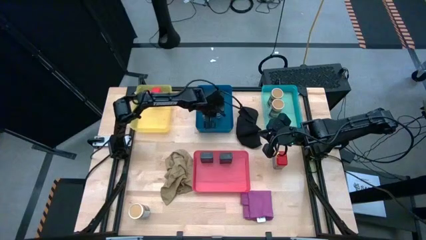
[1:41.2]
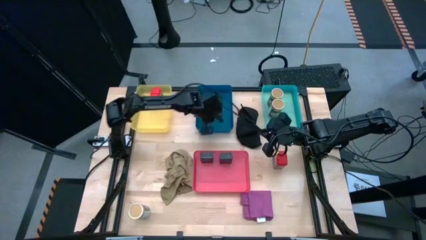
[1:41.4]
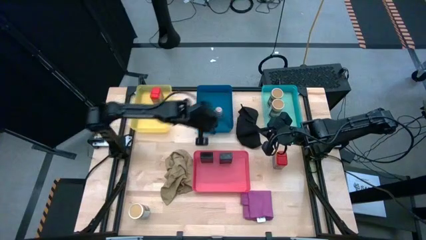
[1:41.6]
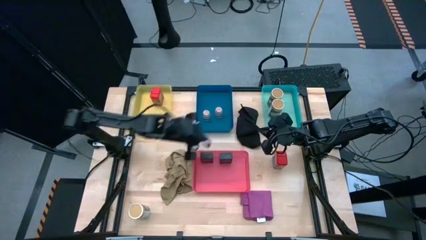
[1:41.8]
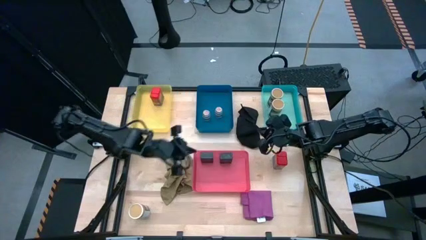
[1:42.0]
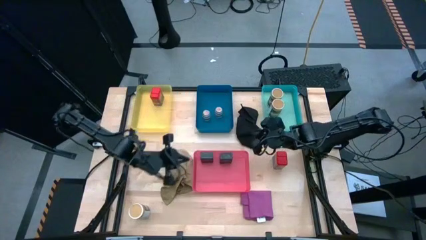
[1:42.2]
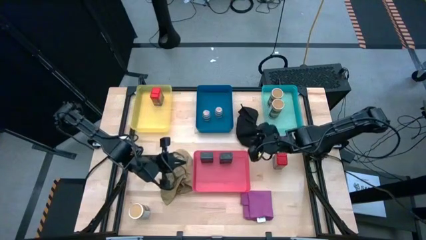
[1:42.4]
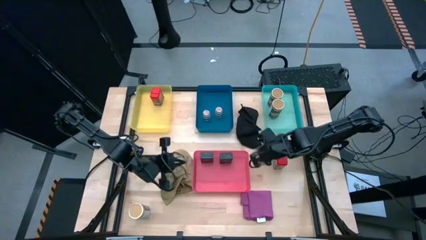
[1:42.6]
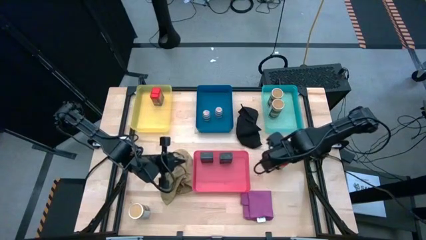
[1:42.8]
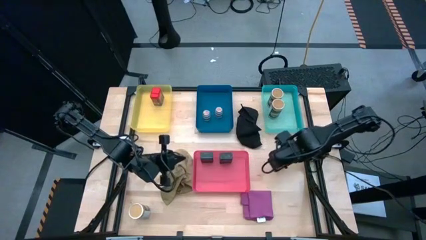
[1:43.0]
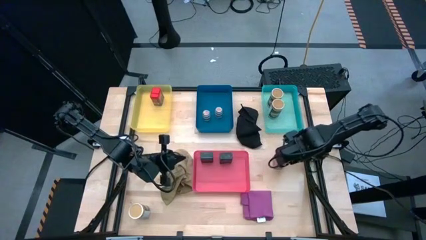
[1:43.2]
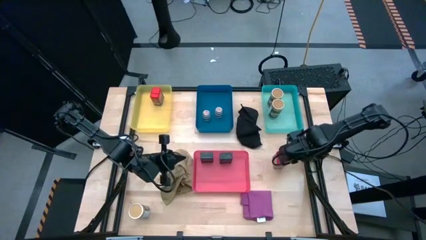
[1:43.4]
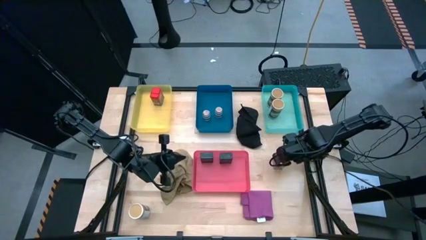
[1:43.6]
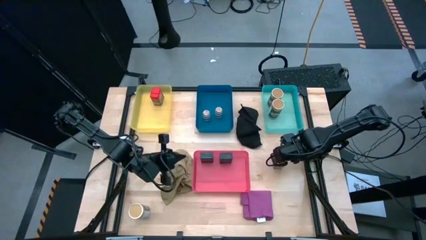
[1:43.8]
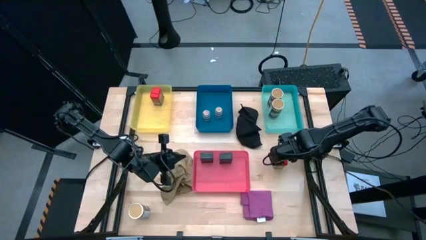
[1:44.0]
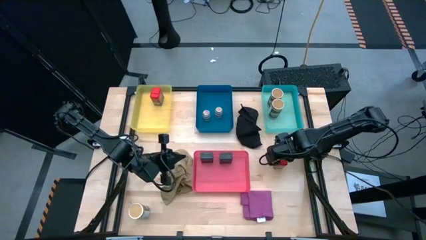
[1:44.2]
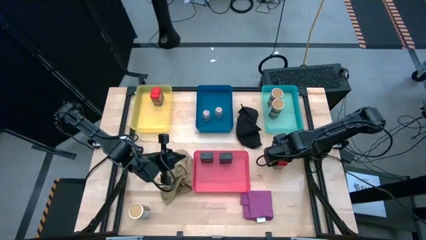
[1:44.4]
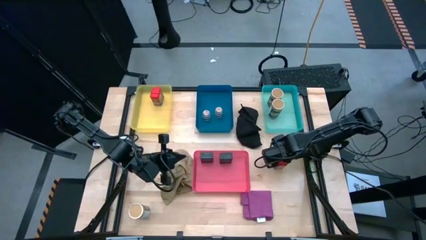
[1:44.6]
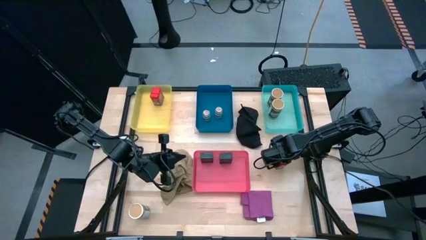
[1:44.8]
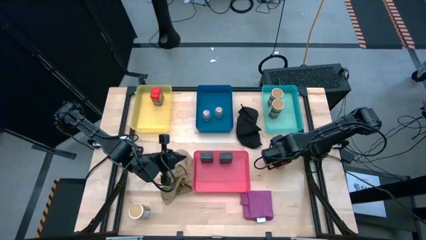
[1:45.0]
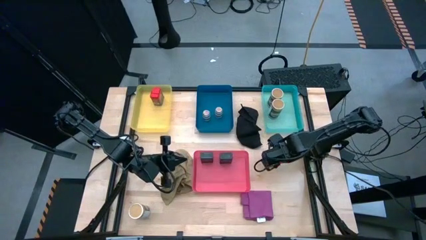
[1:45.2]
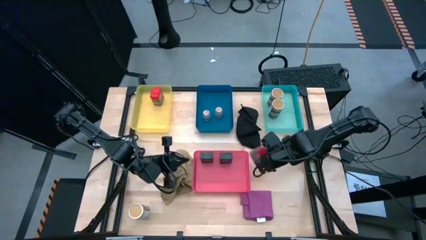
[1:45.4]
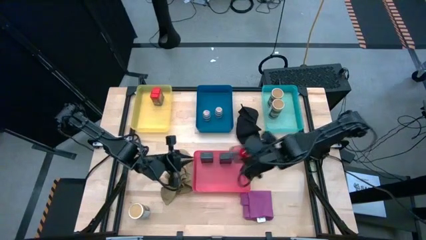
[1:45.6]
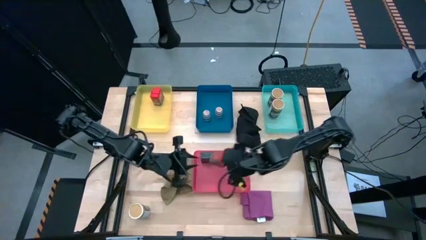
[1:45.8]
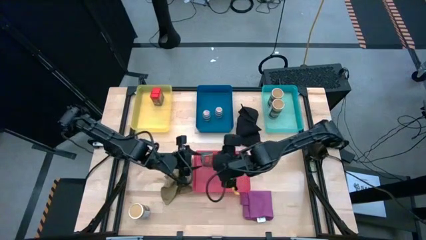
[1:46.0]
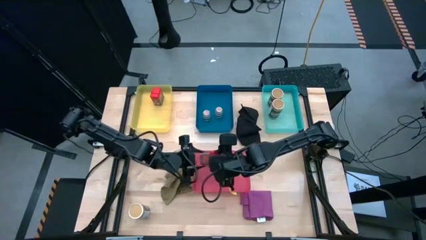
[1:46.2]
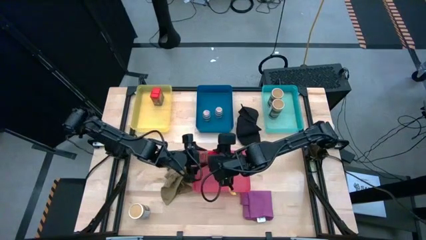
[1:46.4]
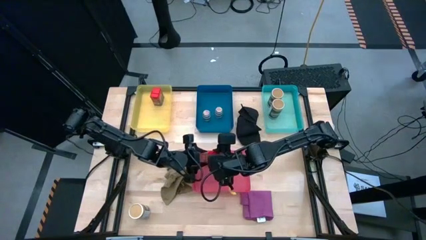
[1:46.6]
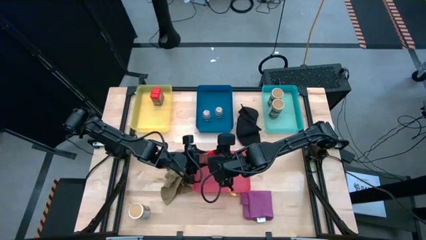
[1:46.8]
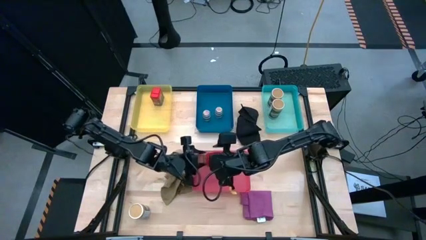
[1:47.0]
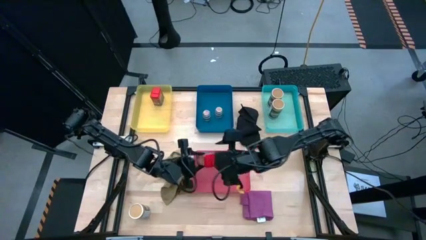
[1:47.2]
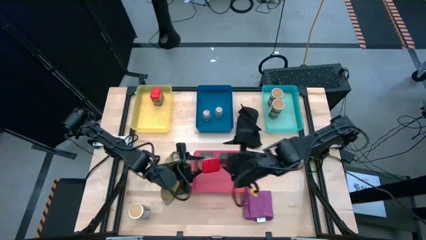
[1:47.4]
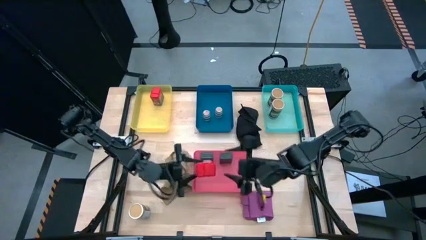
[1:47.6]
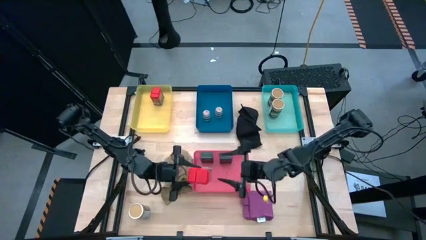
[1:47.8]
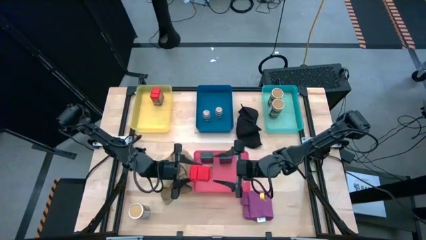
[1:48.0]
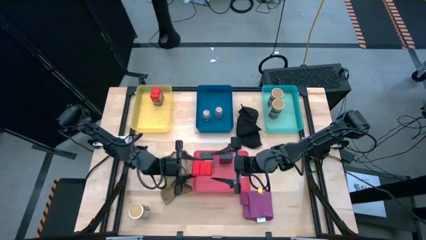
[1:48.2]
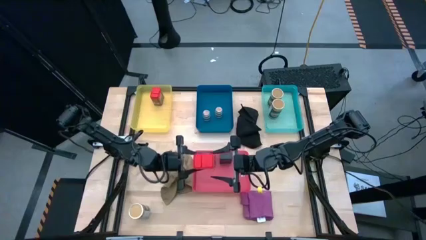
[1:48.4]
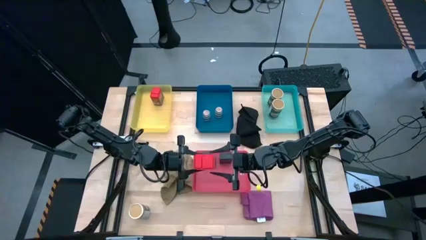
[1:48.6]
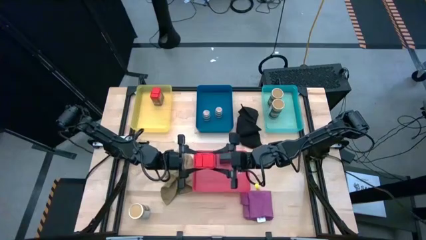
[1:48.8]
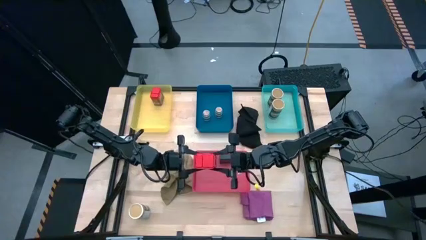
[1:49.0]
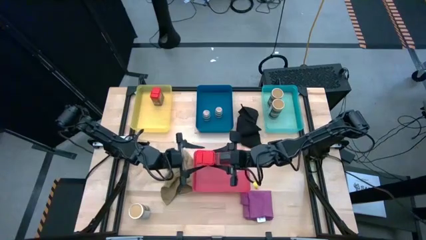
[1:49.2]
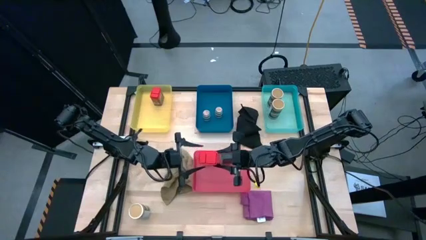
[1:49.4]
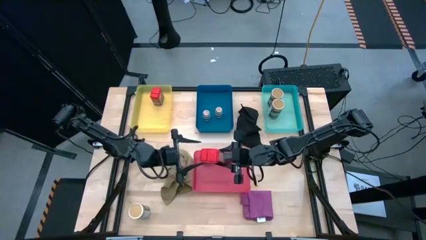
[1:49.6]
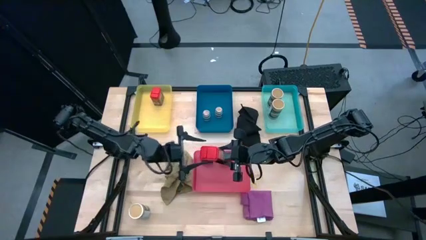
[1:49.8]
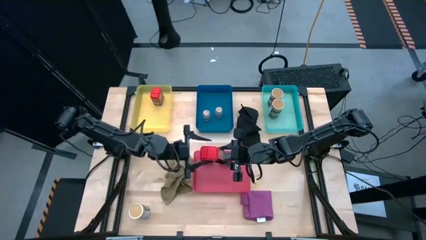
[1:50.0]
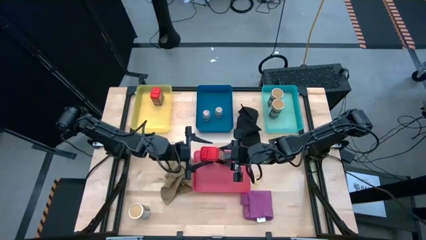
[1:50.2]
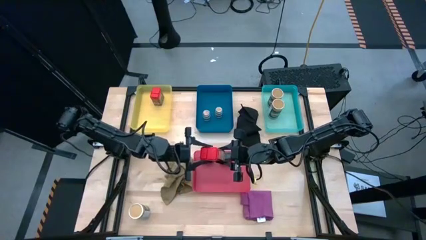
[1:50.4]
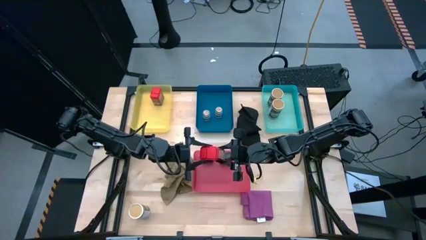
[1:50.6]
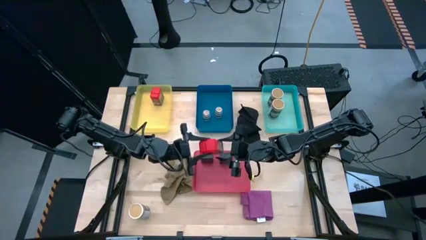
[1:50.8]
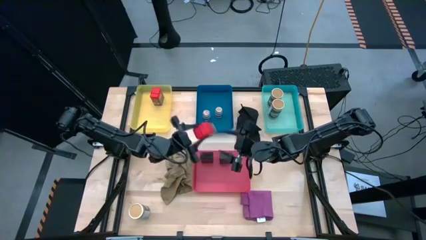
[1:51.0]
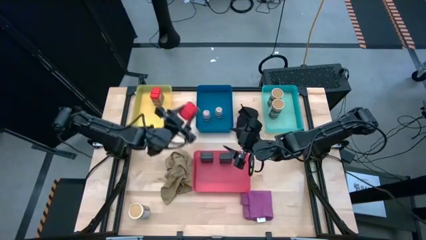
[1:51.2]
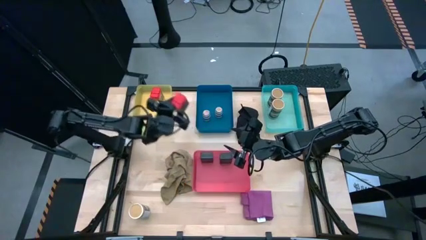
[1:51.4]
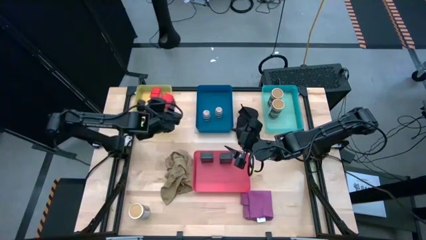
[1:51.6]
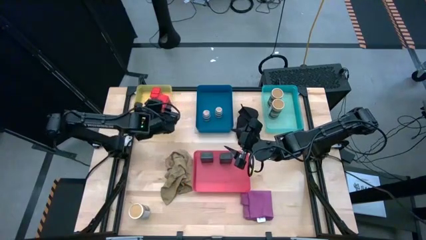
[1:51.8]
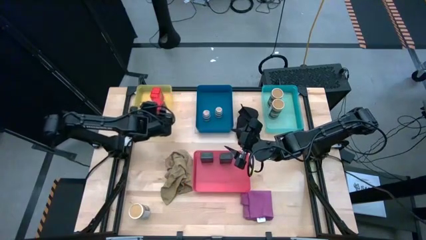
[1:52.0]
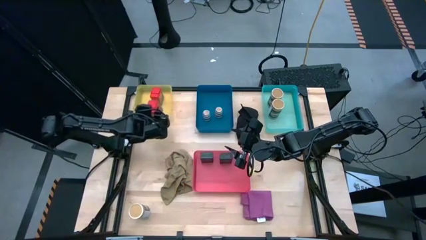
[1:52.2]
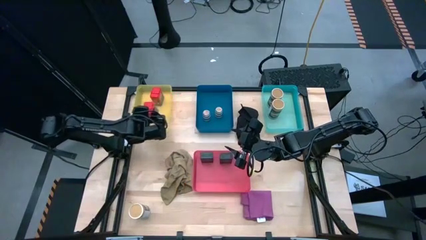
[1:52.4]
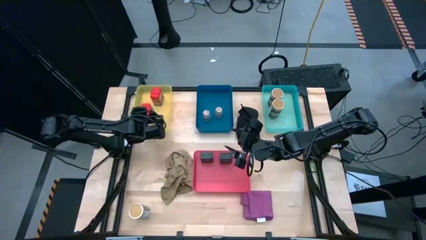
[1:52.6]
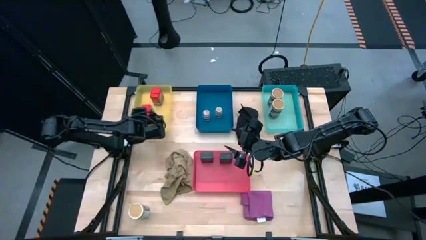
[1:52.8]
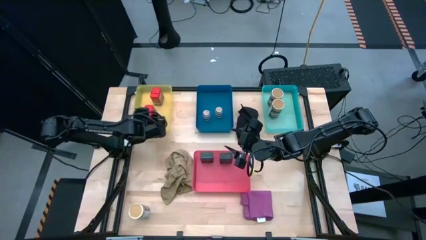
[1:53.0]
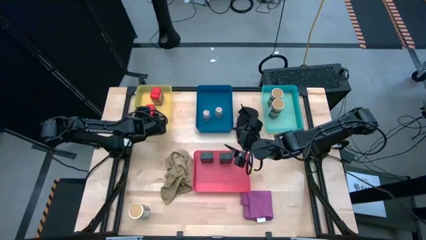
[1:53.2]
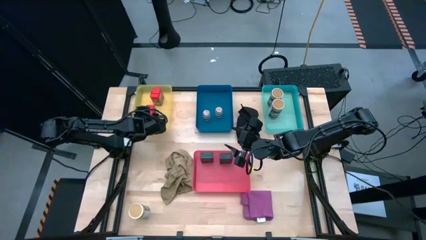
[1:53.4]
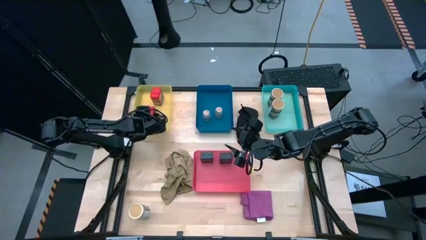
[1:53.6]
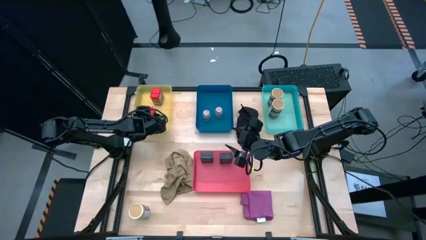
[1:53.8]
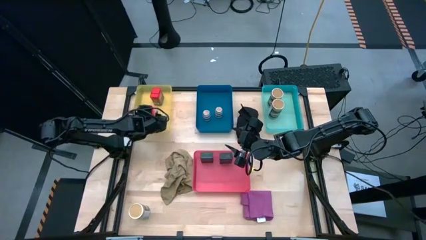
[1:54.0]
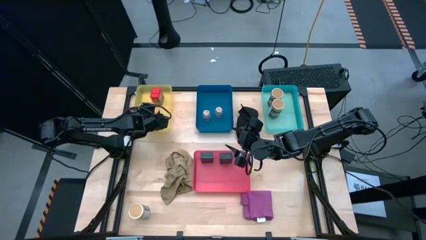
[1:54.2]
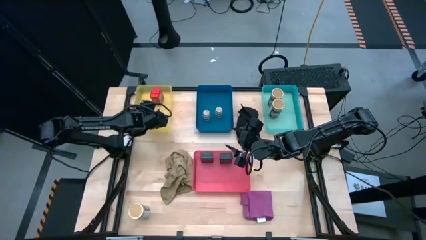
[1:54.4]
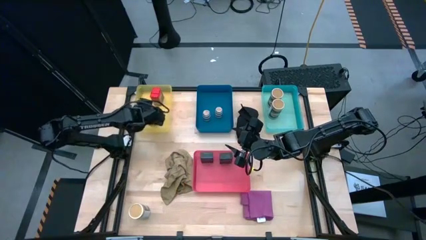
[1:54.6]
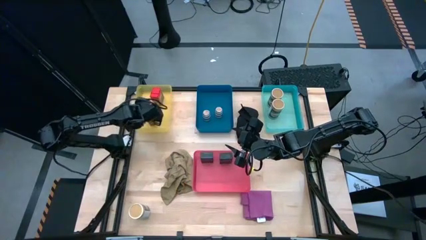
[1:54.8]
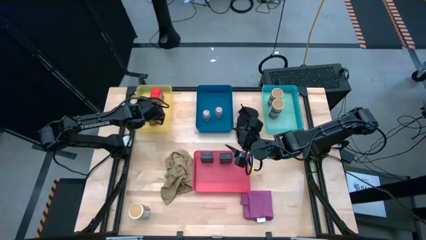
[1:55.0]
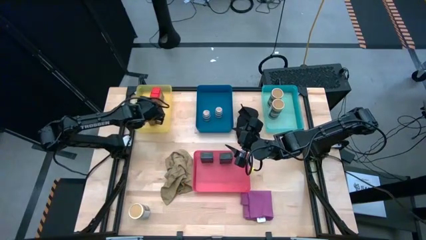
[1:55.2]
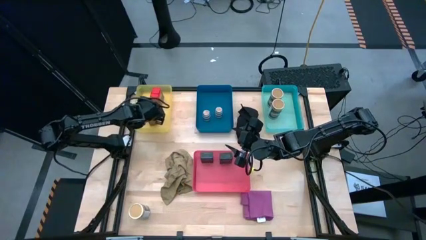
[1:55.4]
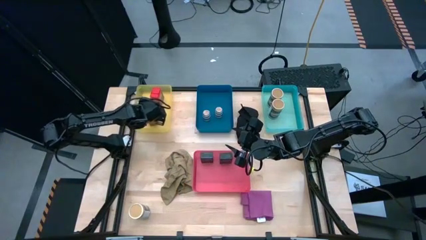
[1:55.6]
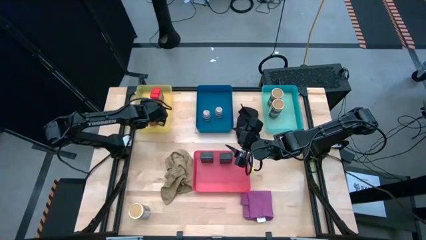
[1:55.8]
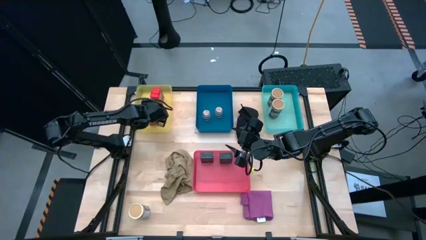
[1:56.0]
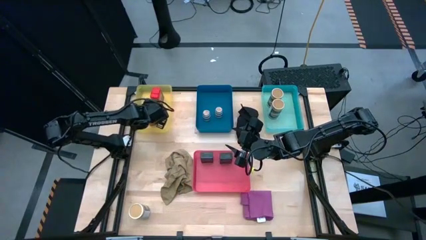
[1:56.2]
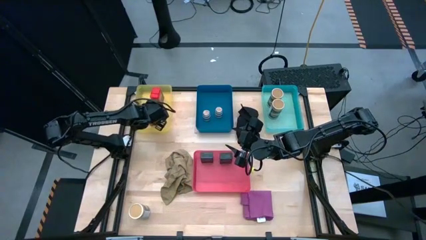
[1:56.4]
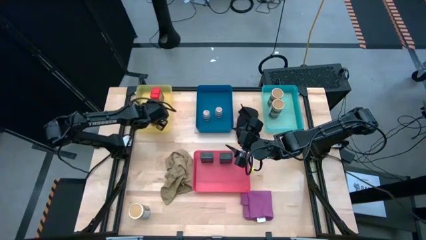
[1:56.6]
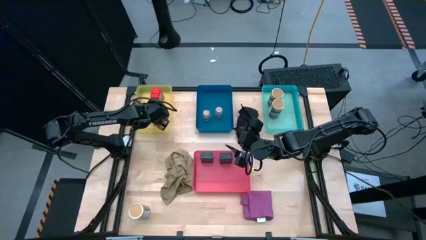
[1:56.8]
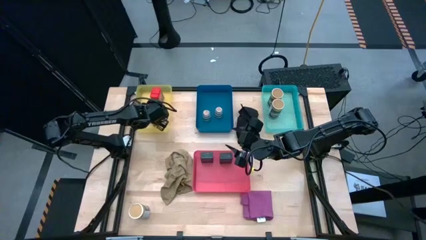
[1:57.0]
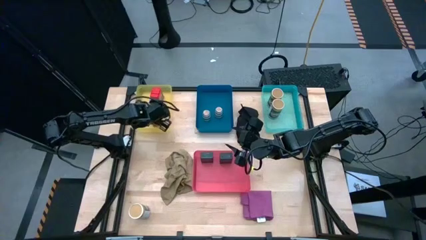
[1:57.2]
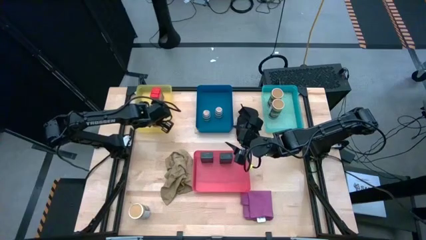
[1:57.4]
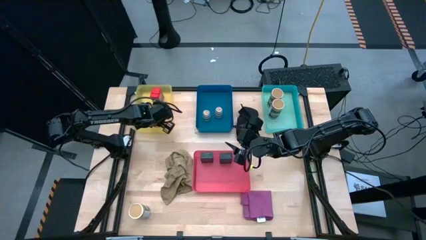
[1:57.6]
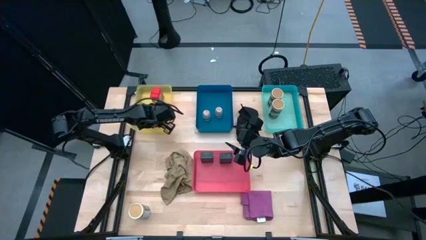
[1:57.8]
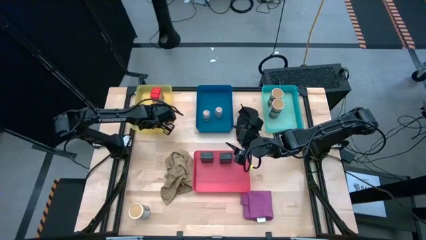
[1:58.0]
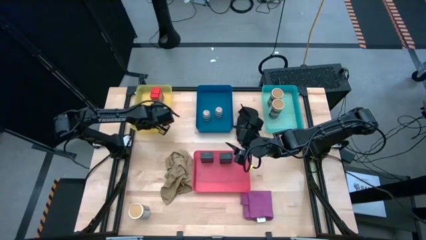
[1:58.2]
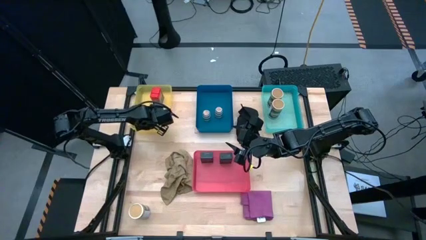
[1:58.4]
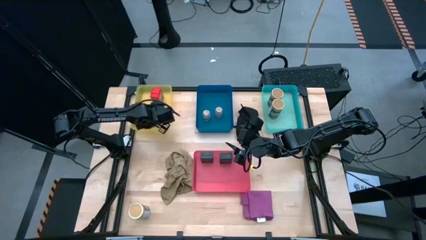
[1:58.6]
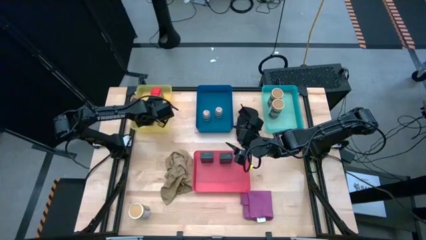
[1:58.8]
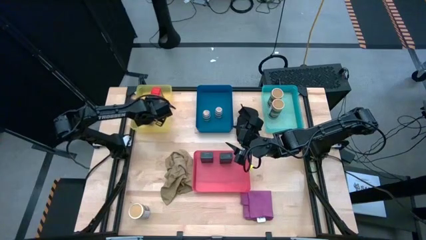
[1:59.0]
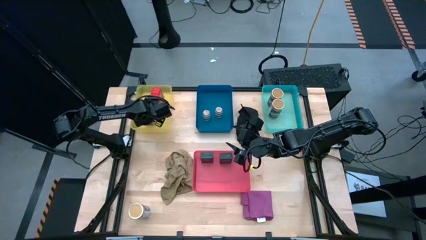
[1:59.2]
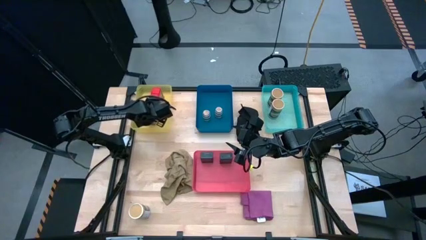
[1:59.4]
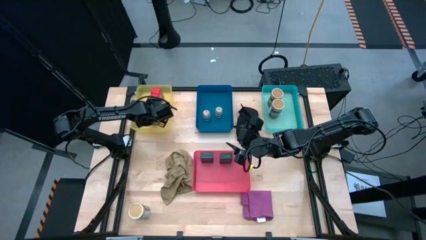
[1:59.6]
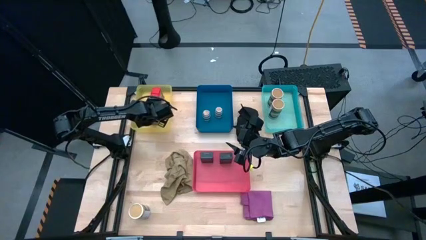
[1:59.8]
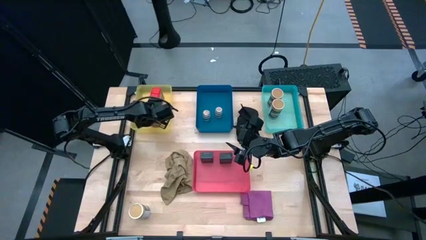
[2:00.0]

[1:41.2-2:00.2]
Task: Sort spices by type
Put the red seasoning can into the yellow bin
